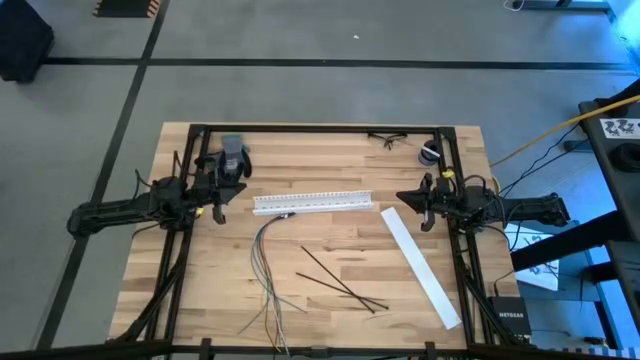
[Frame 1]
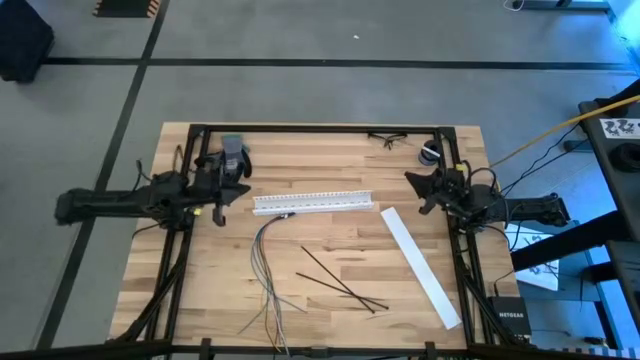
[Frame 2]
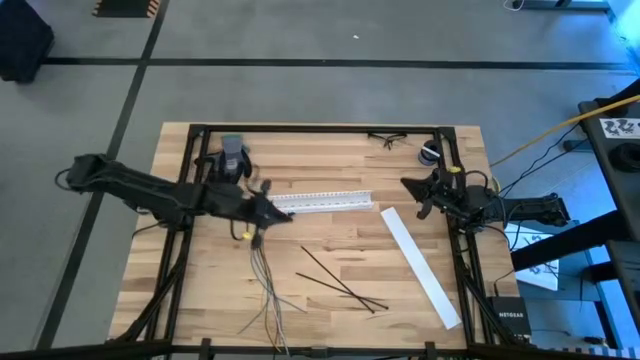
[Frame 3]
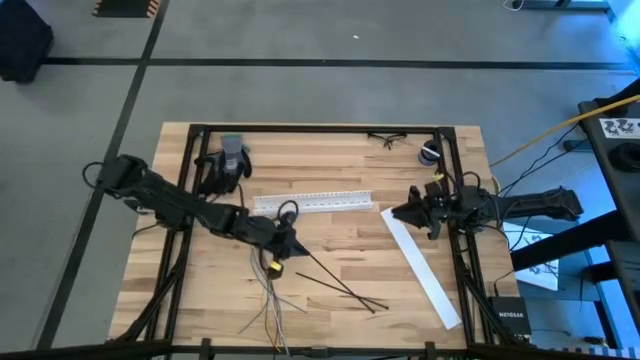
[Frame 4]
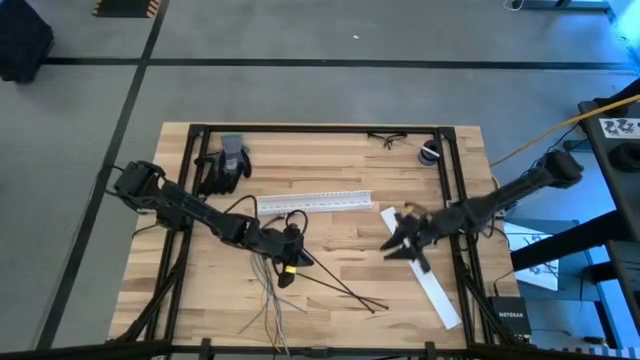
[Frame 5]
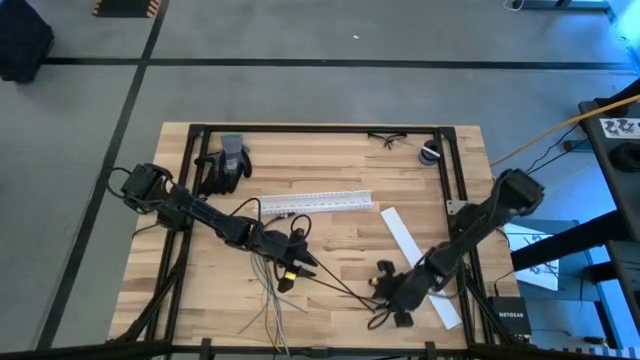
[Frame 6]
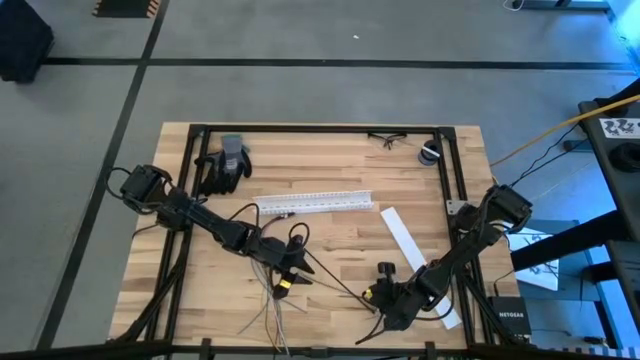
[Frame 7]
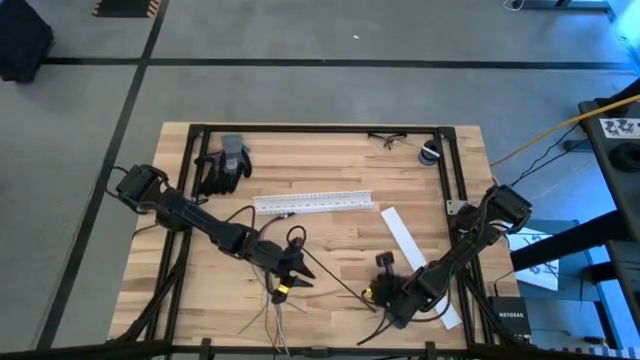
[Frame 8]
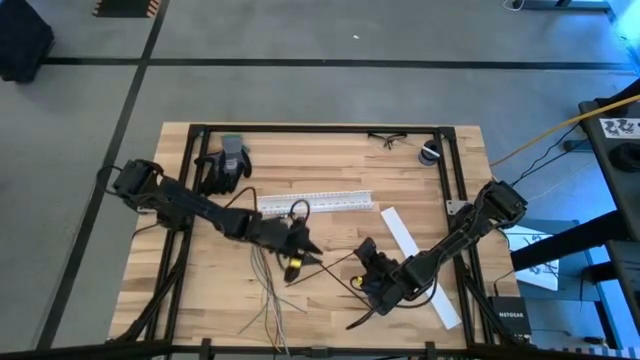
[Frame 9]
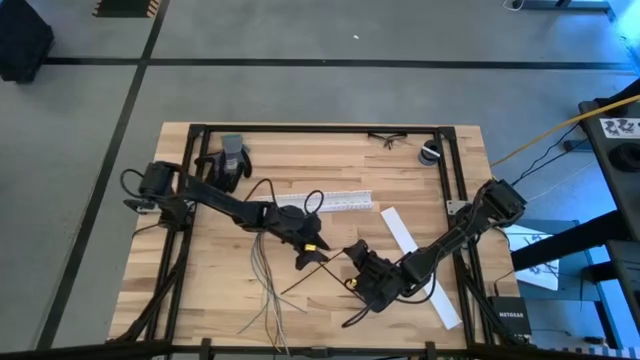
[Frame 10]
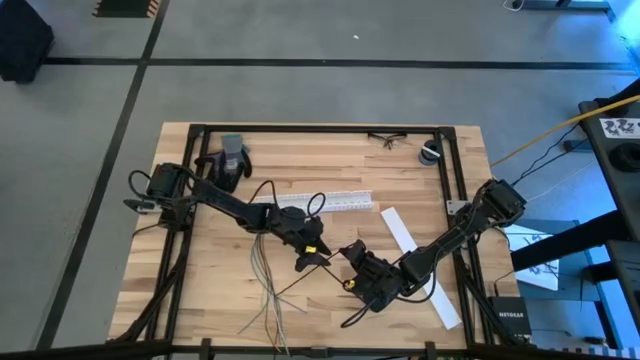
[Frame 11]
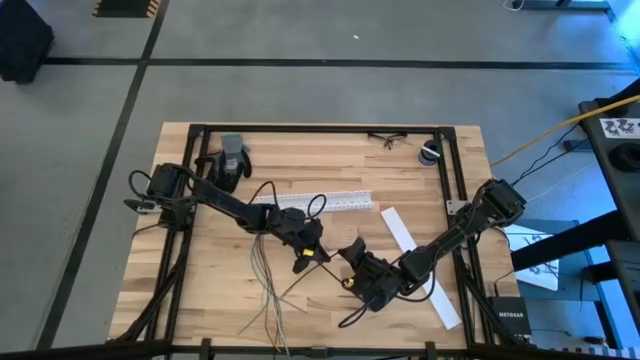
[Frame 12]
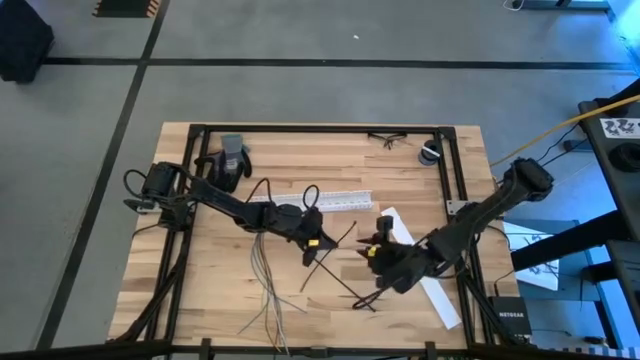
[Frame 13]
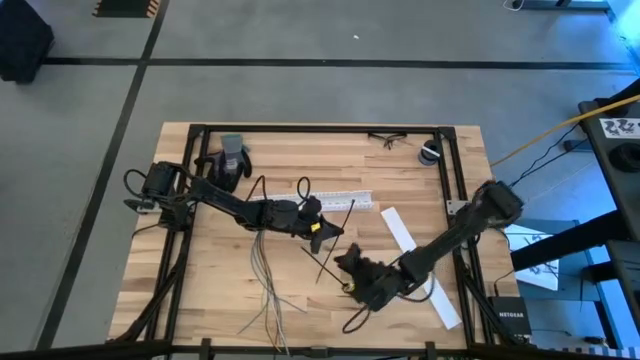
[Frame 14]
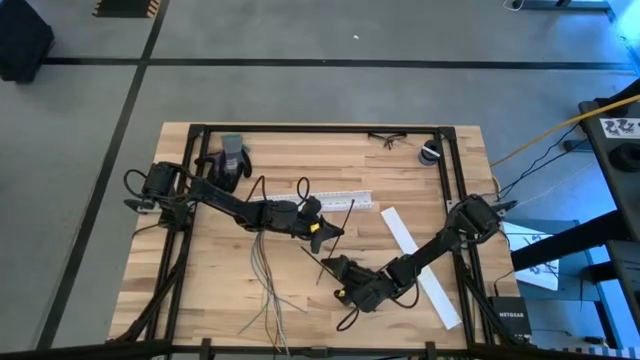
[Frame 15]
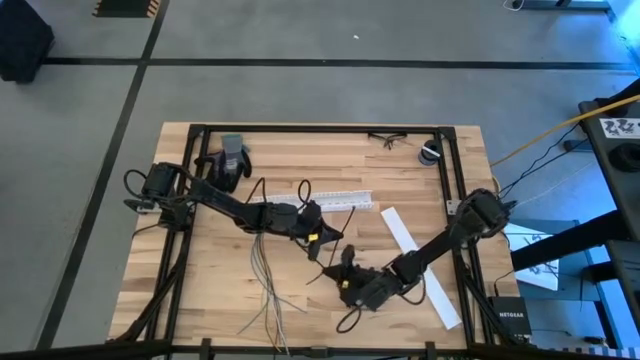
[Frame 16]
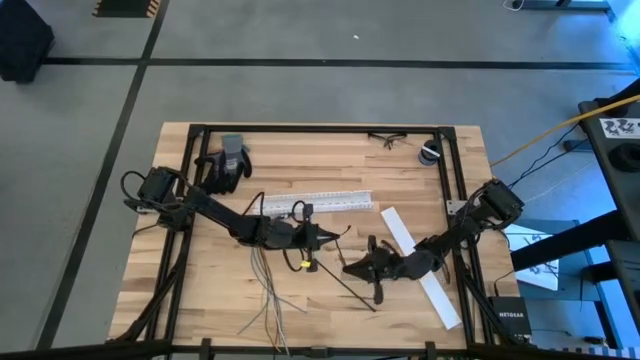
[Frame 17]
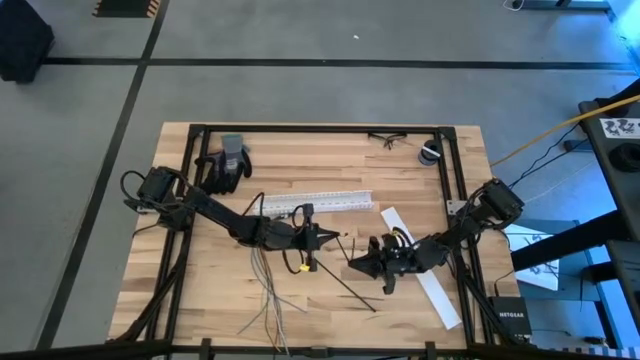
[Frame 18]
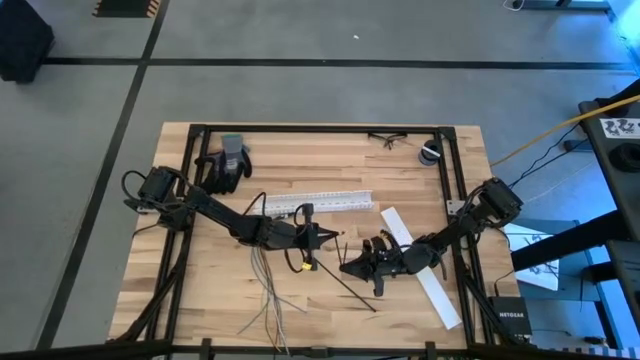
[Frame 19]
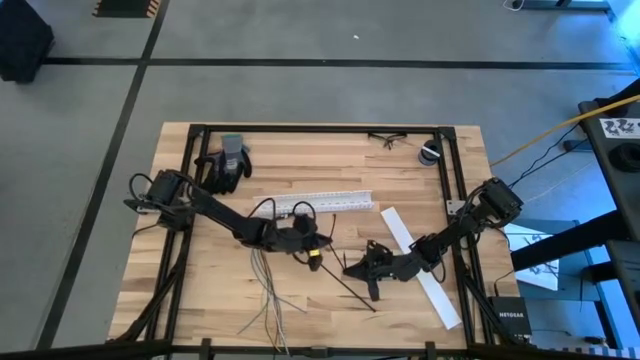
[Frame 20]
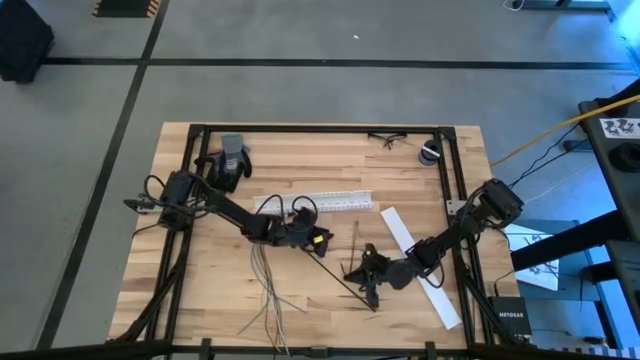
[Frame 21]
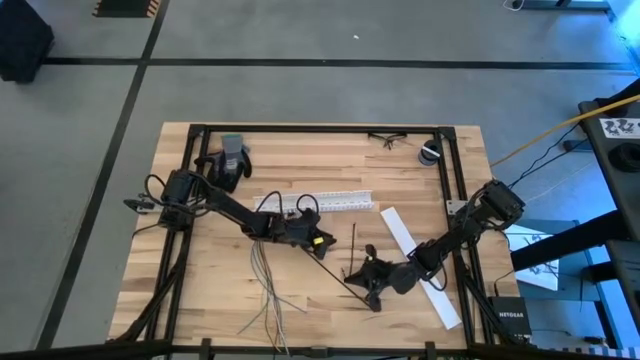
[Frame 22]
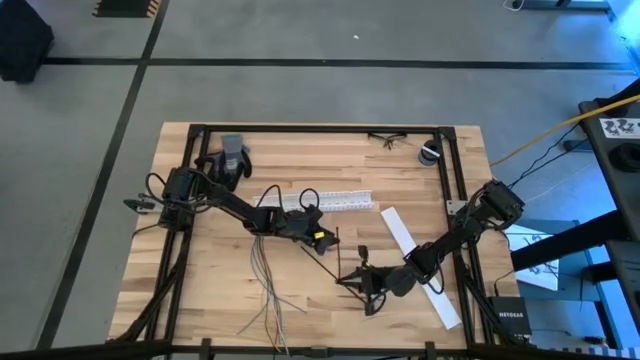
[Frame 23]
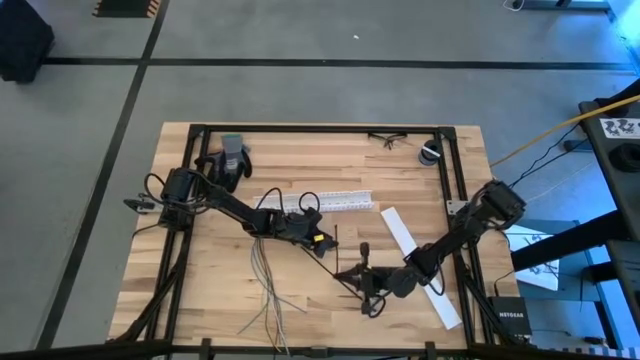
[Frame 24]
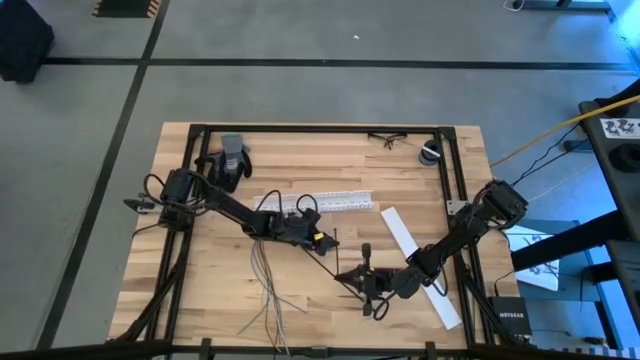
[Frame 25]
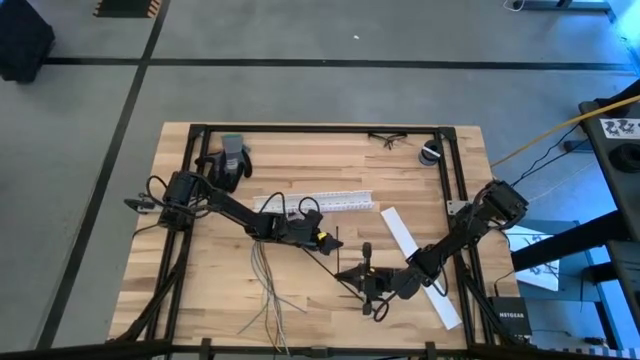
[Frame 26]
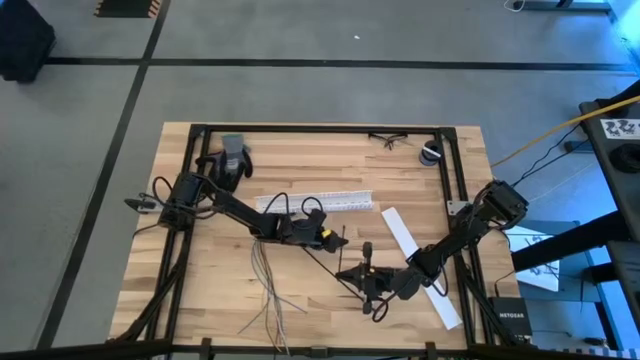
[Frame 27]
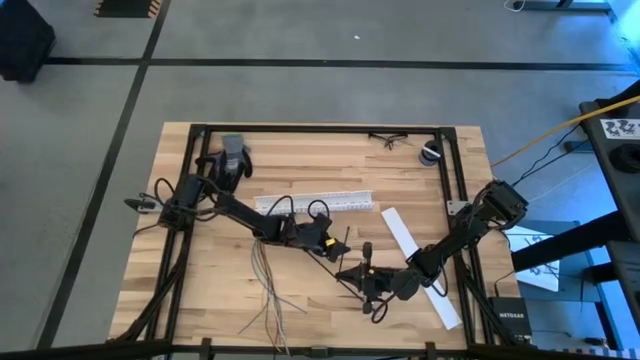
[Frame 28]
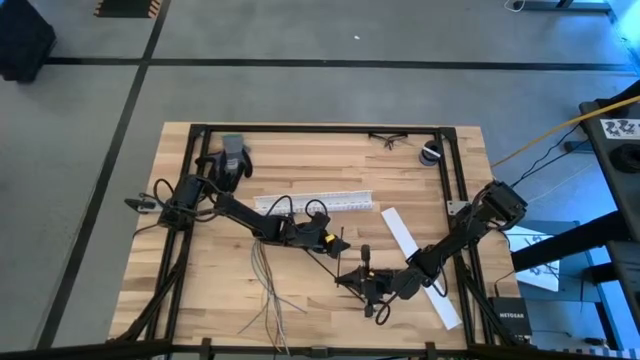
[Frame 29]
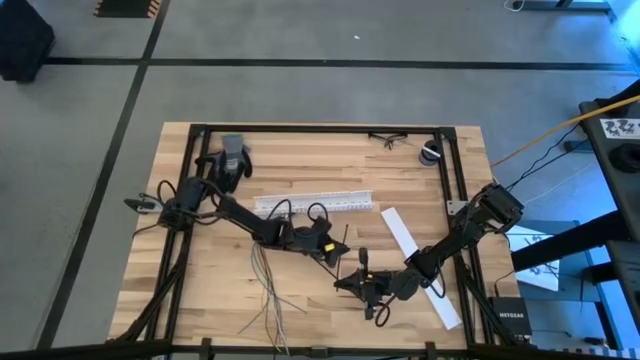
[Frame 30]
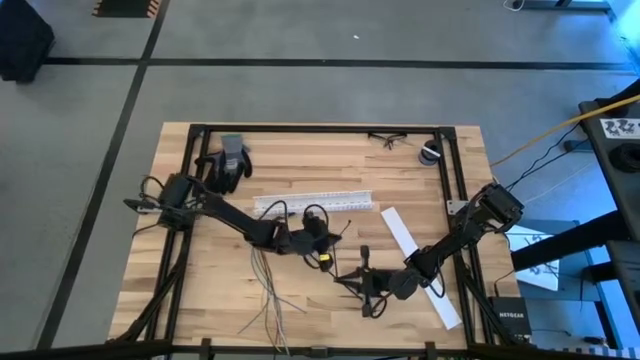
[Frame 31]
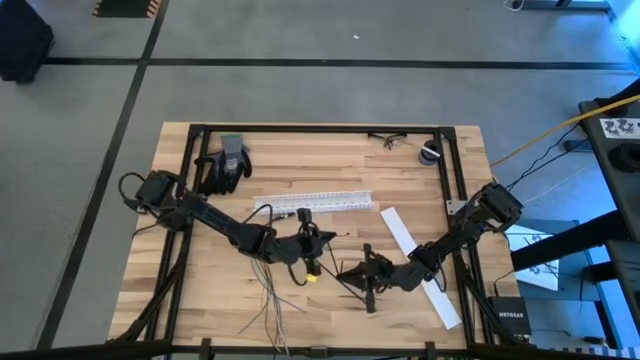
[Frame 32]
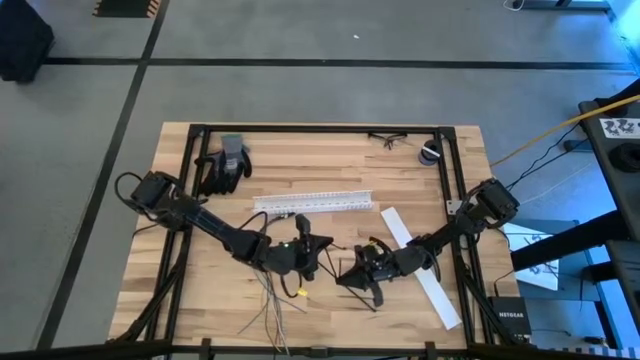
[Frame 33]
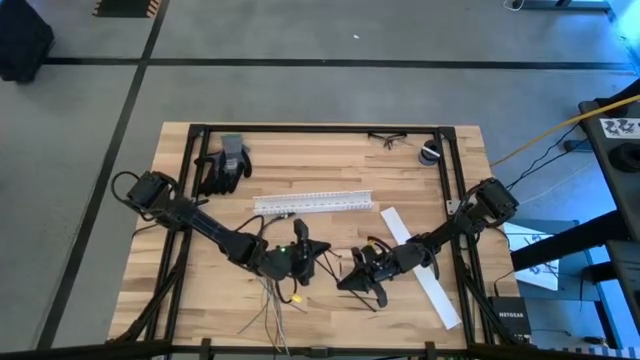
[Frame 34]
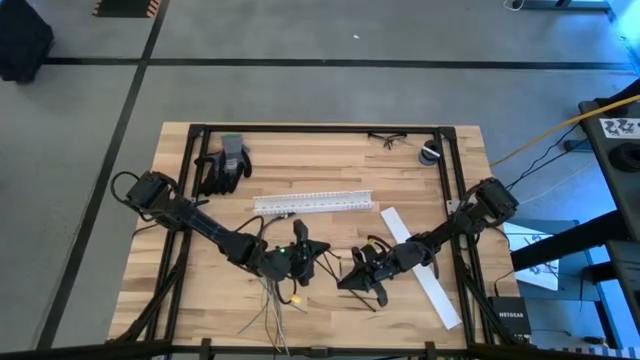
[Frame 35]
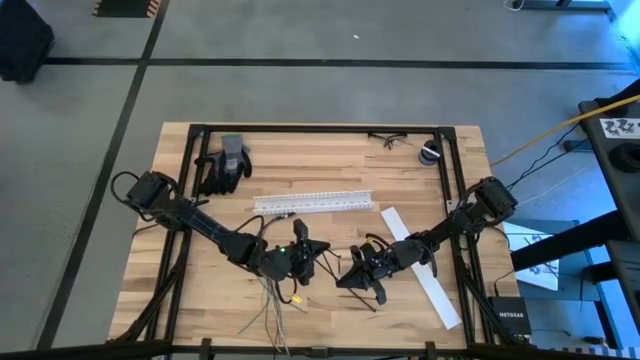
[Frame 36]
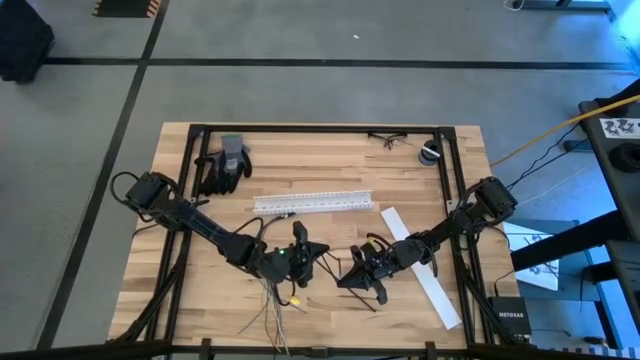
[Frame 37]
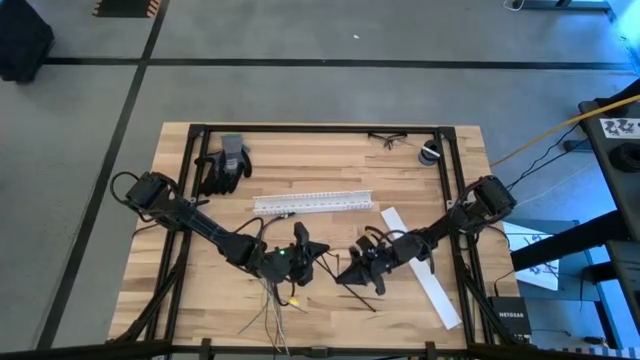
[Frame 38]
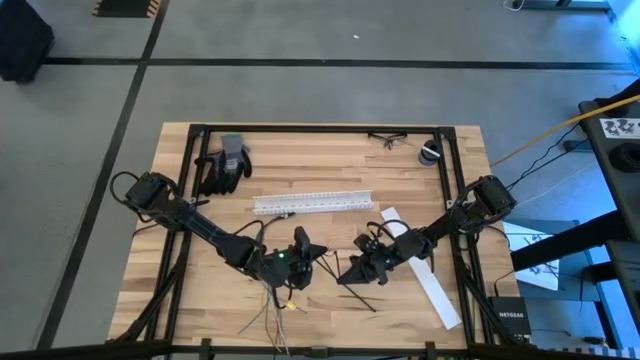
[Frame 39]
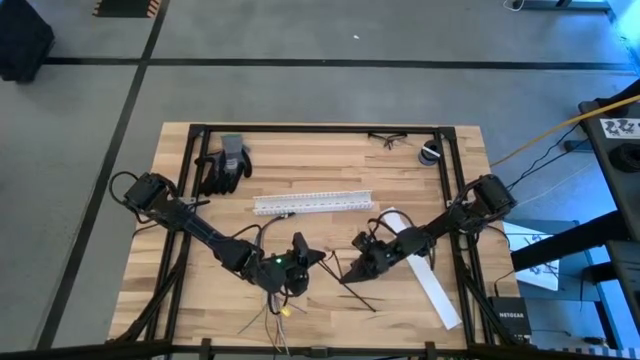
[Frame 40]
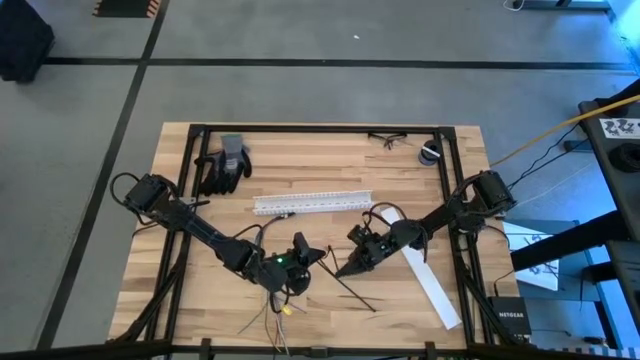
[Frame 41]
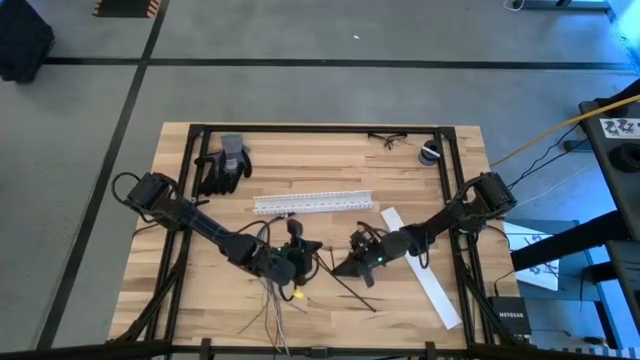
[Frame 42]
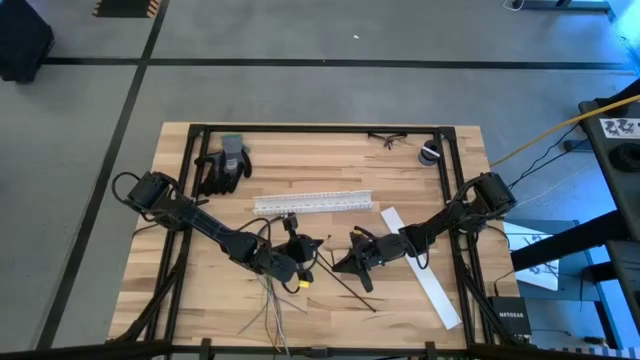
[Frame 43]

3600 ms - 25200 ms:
Task: Ziptie cables
Prepare the black ziptie
